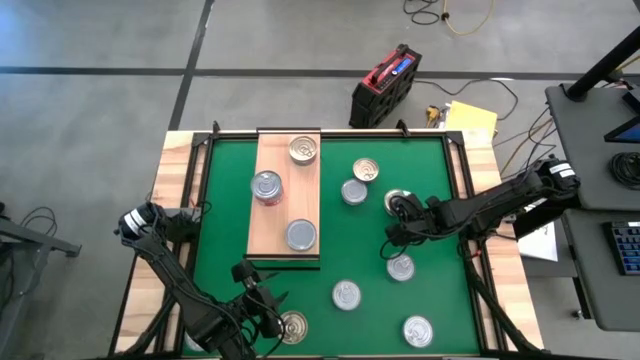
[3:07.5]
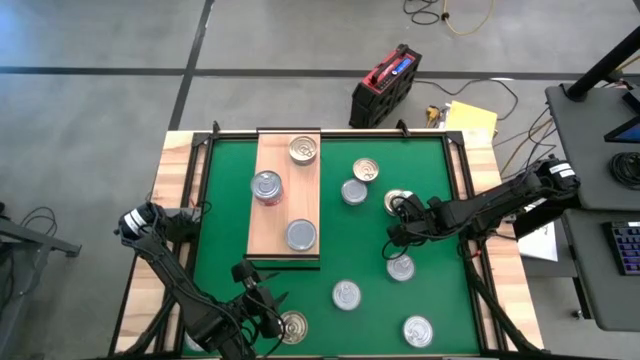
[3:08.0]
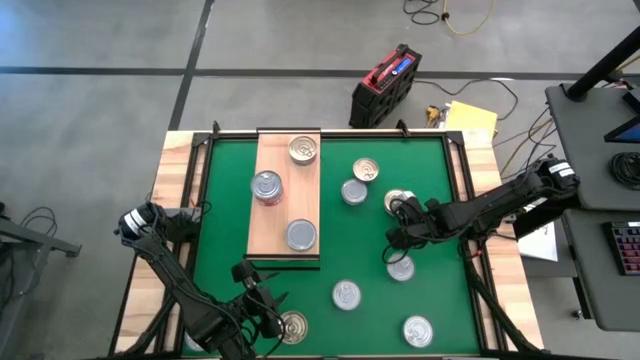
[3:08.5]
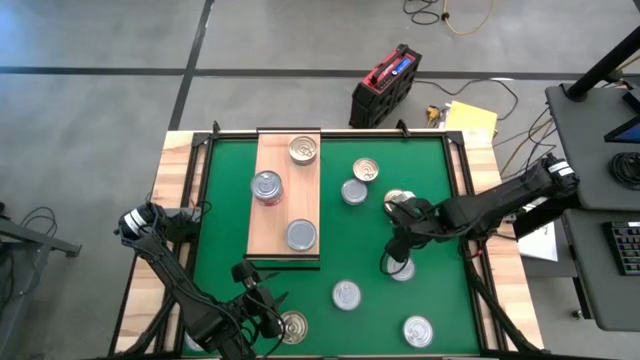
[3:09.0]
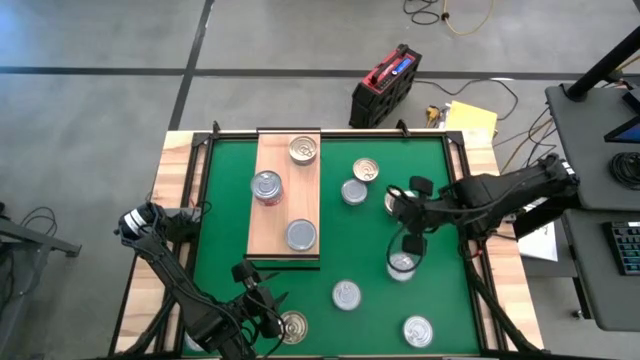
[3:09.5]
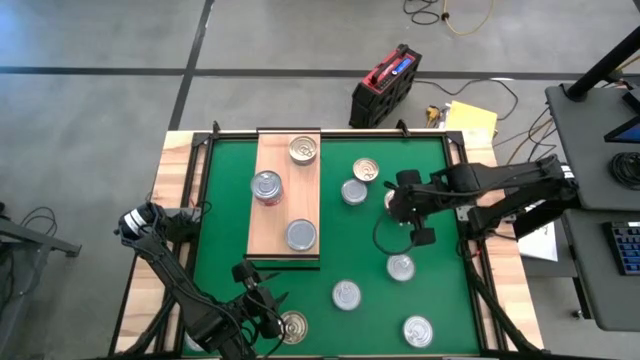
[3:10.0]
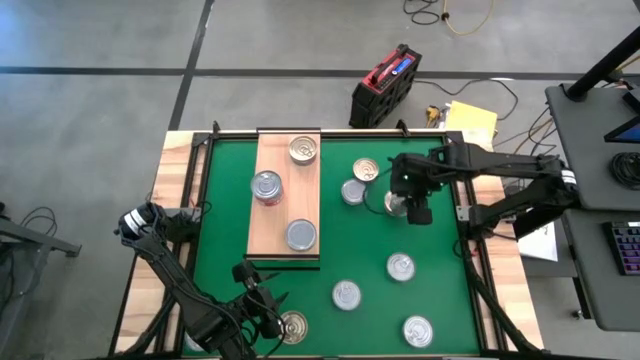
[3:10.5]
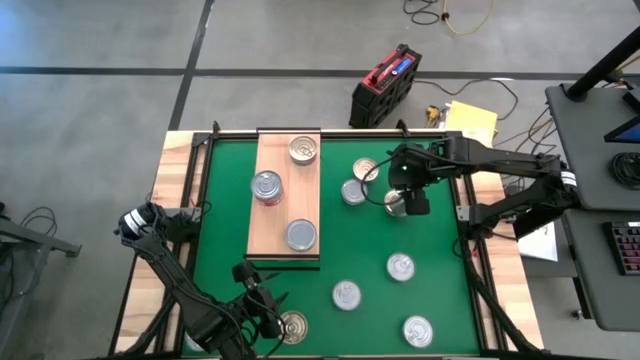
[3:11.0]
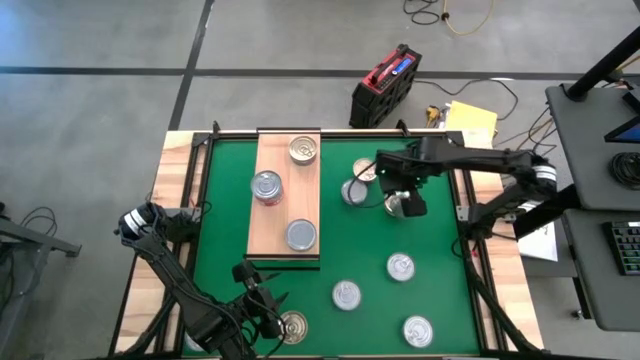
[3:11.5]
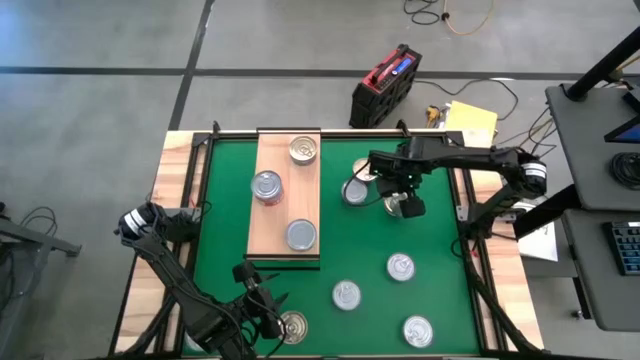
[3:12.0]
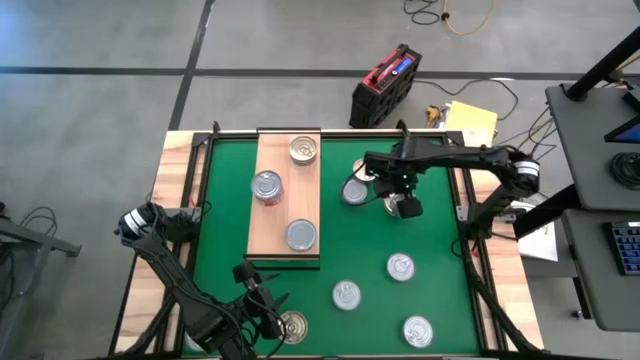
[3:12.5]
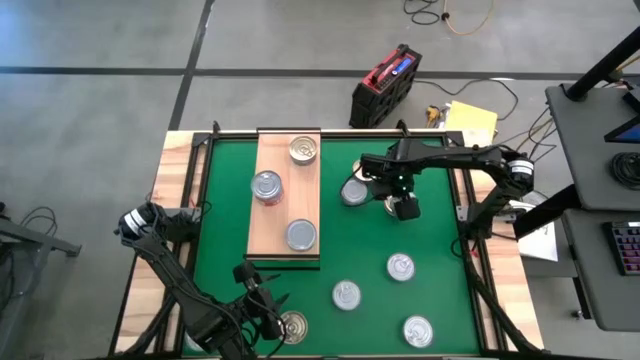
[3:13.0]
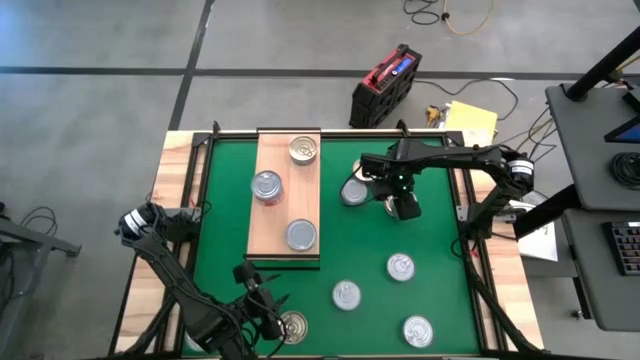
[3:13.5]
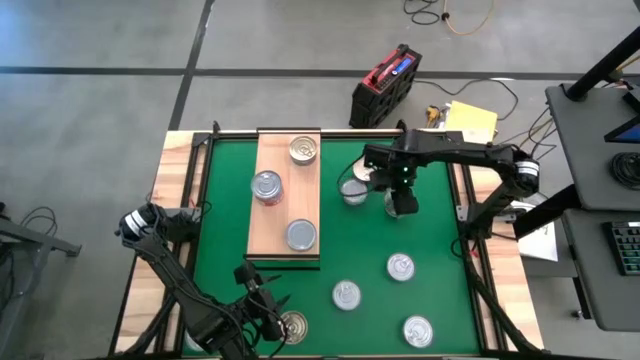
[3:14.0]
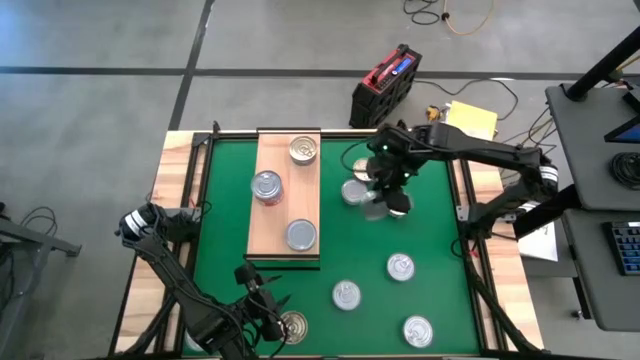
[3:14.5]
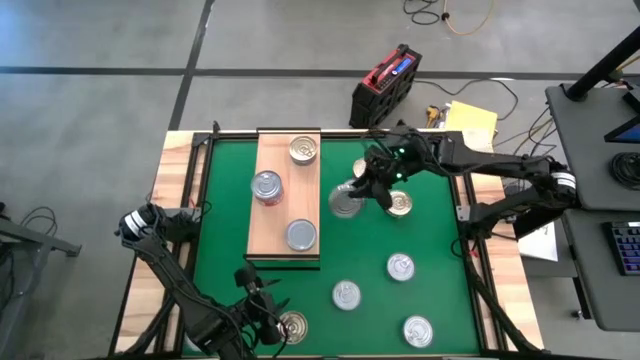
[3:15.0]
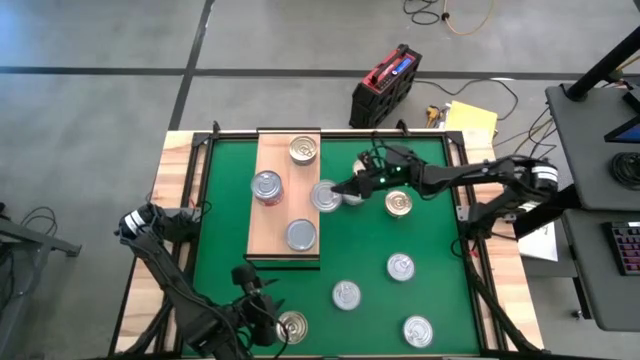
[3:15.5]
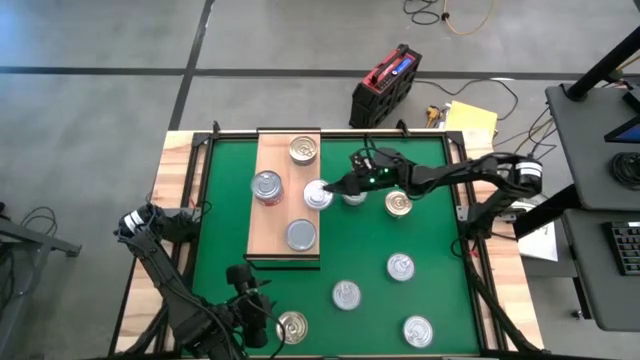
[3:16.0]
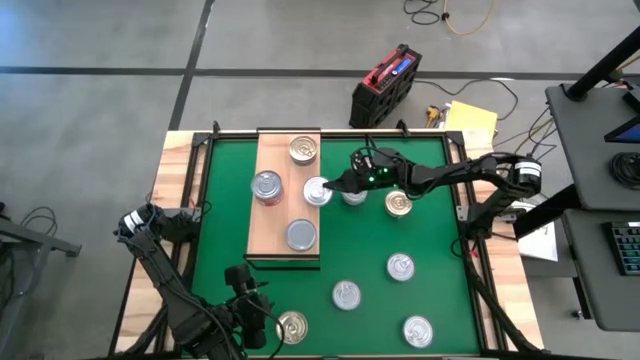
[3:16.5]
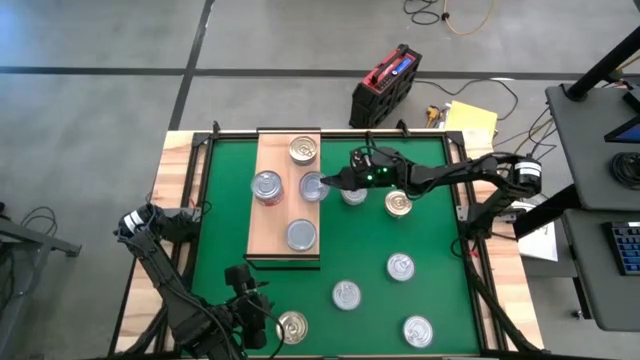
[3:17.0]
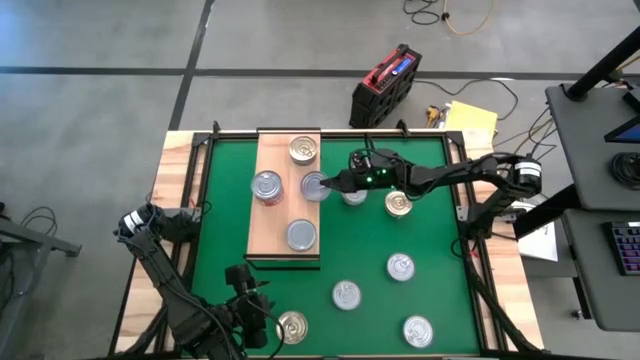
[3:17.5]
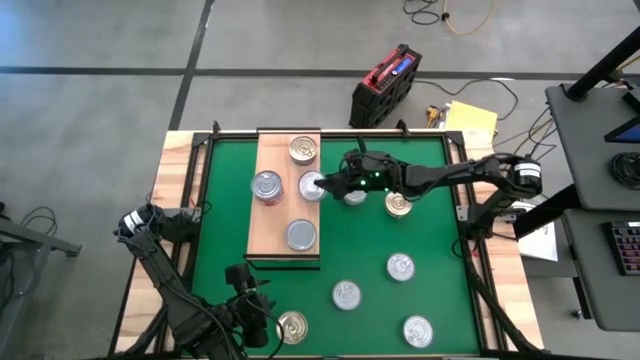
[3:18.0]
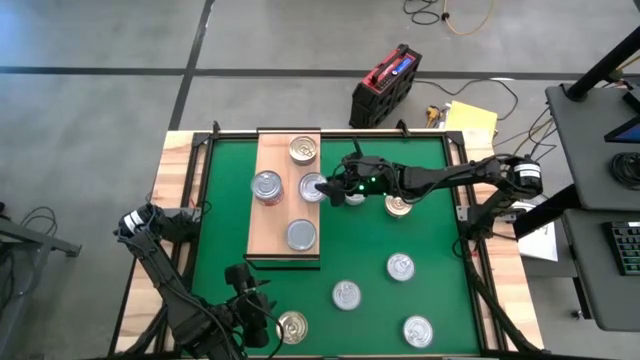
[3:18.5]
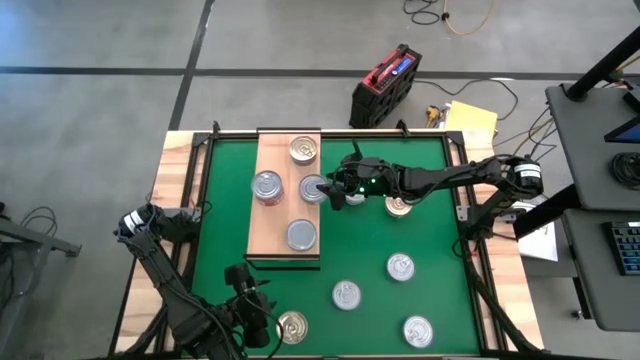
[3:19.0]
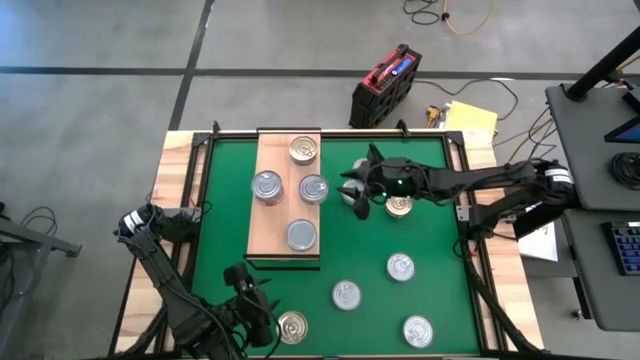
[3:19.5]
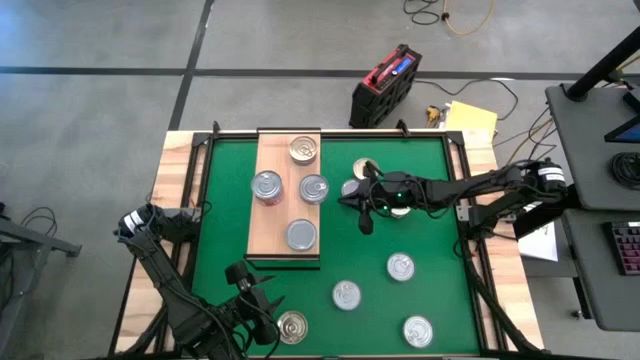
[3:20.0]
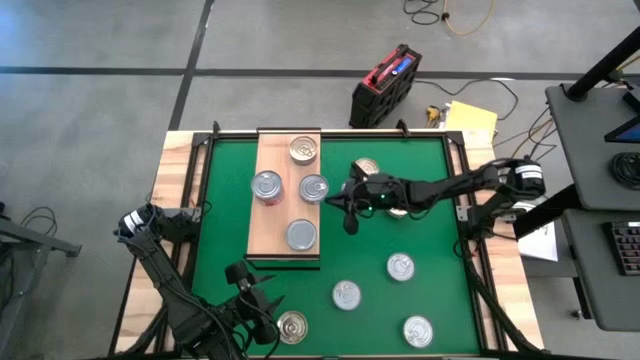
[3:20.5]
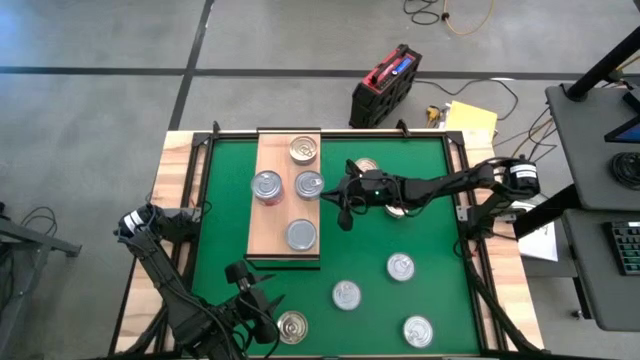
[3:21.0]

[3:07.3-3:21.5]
Task: Stack canned seafood by type on shelf
Put the green tuna can on the shelf

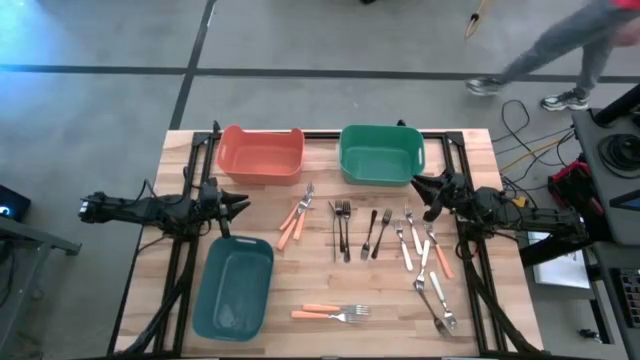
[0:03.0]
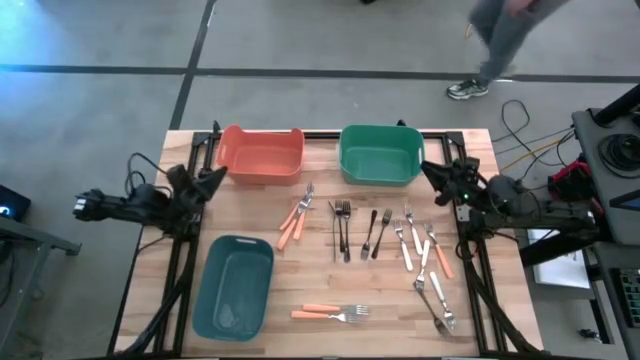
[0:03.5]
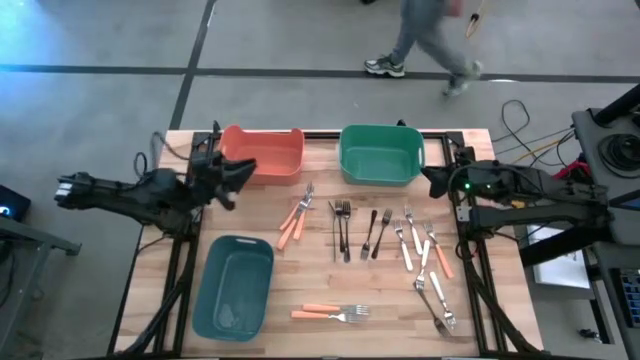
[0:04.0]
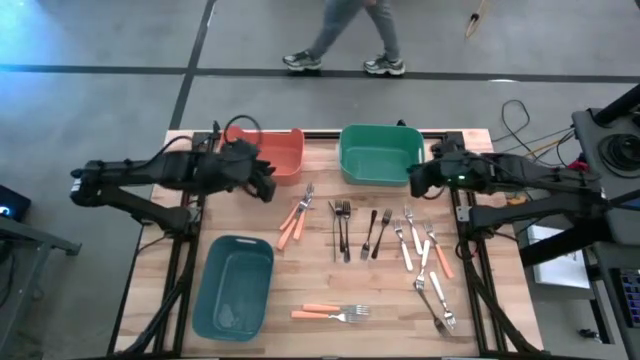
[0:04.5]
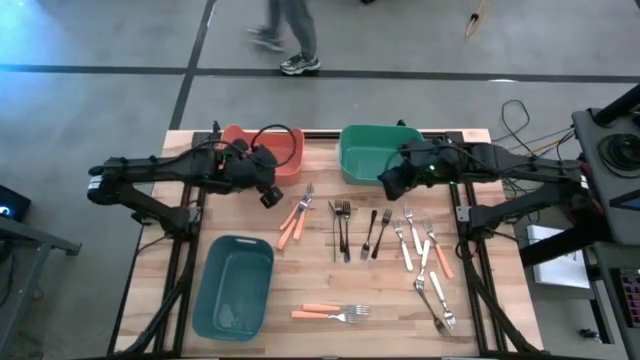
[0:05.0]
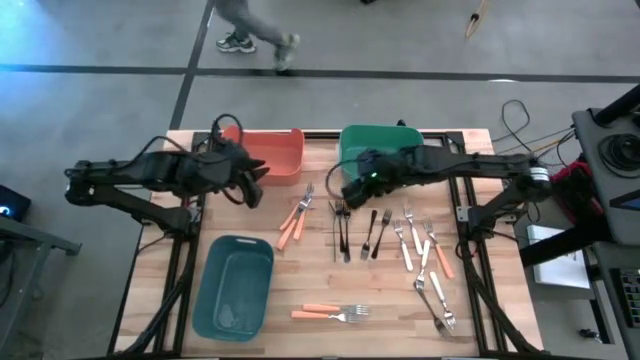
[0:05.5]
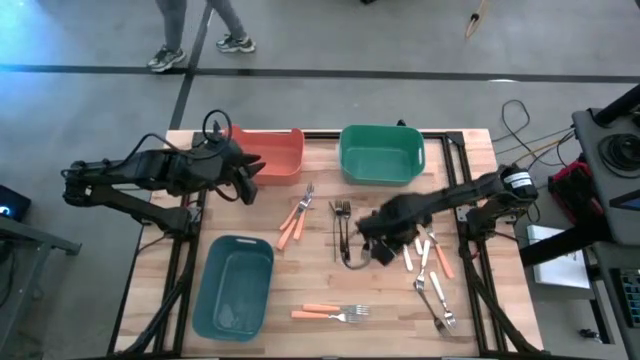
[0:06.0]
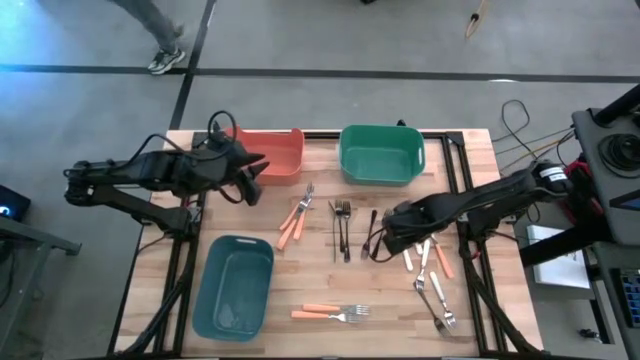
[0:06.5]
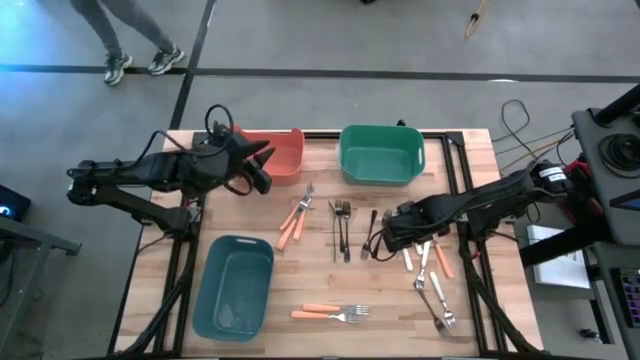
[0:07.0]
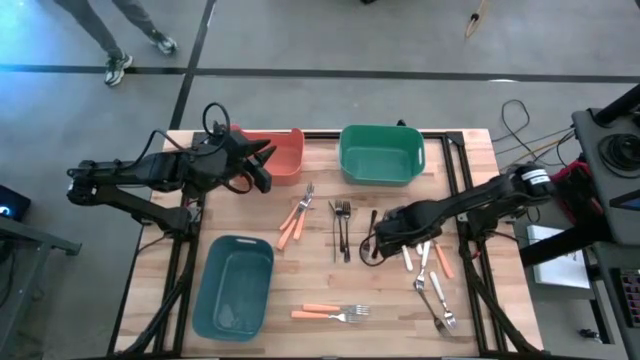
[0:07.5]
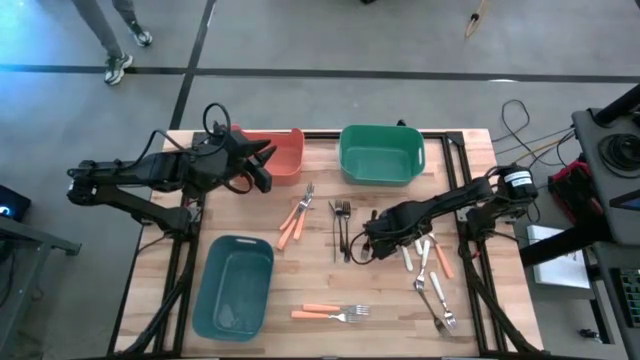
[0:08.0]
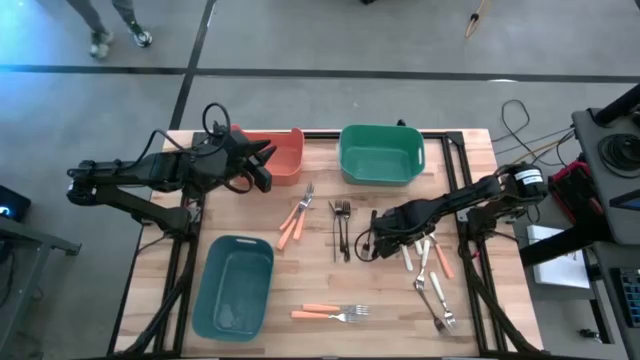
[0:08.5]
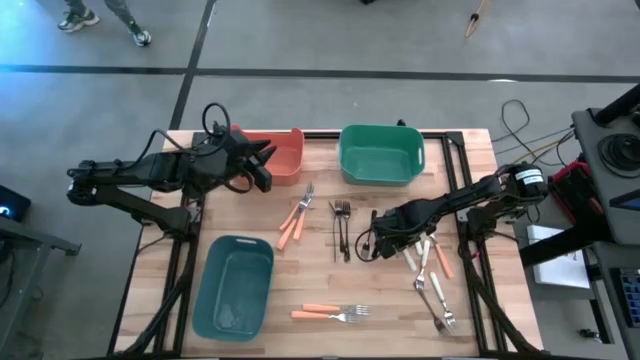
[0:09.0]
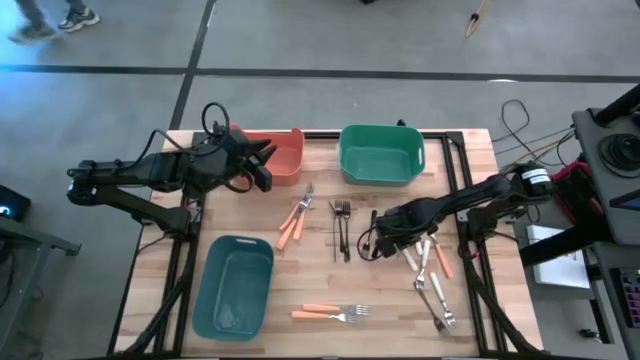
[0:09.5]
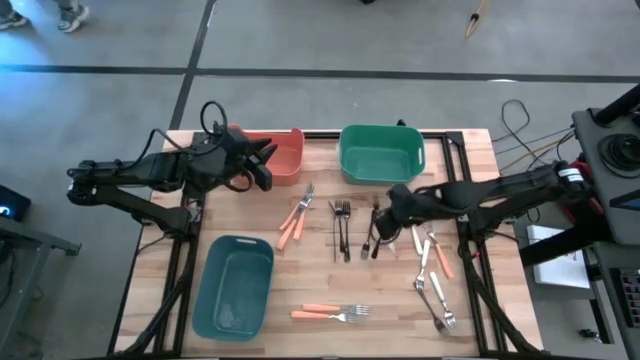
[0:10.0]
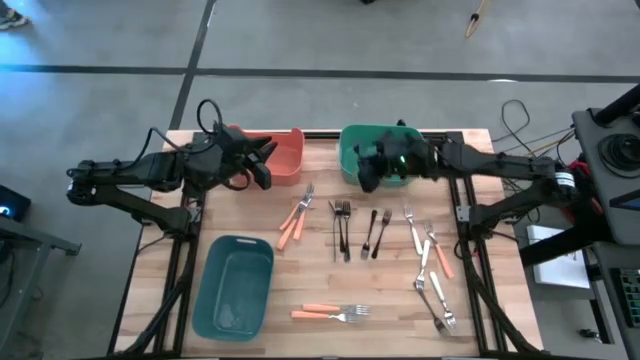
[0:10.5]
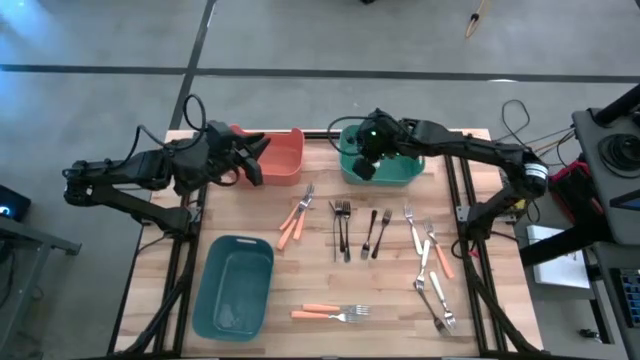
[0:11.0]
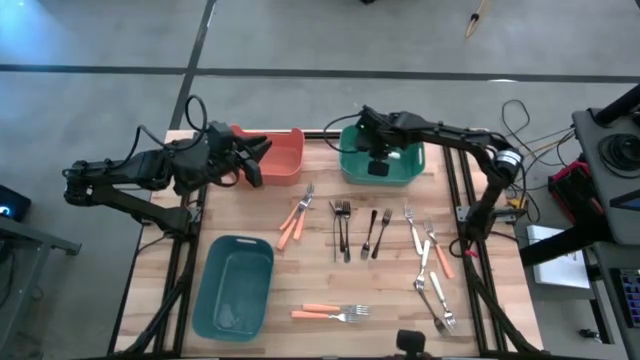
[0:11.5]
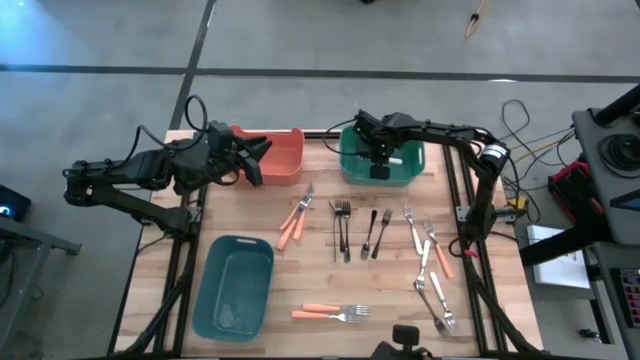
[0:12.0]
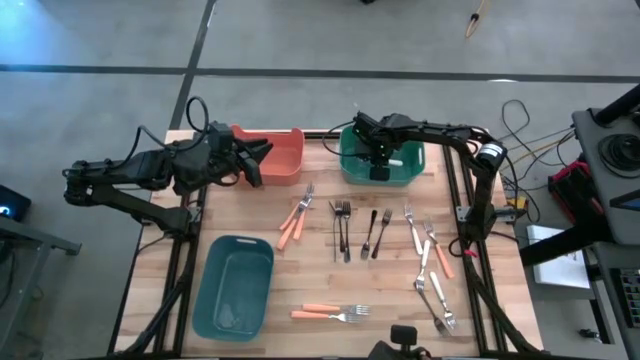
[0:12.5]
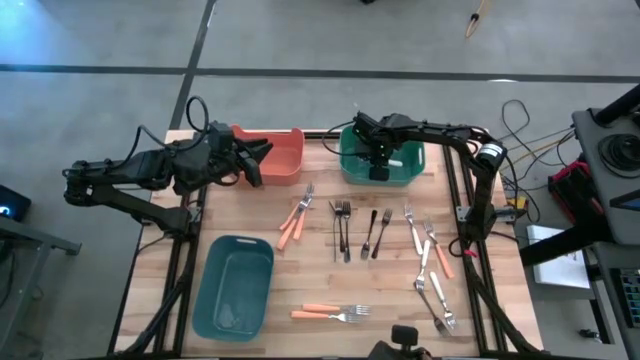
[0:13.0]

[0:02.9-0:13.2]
Task: Sort silverware by color (type)
Put the white fork into the green bin
